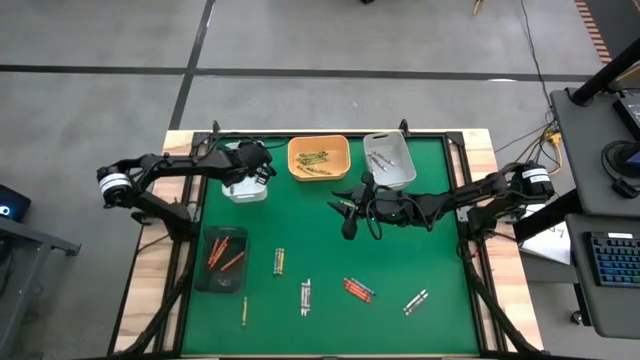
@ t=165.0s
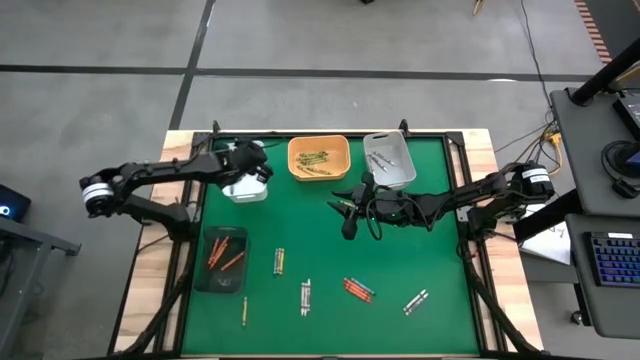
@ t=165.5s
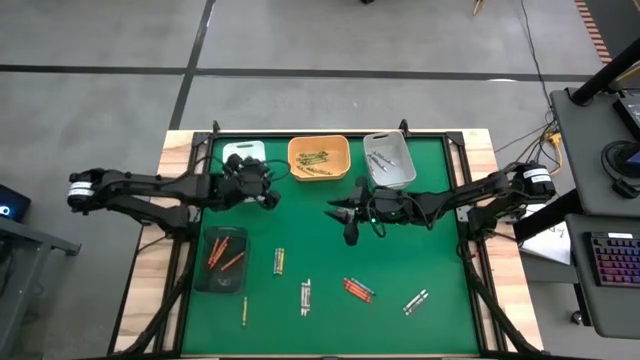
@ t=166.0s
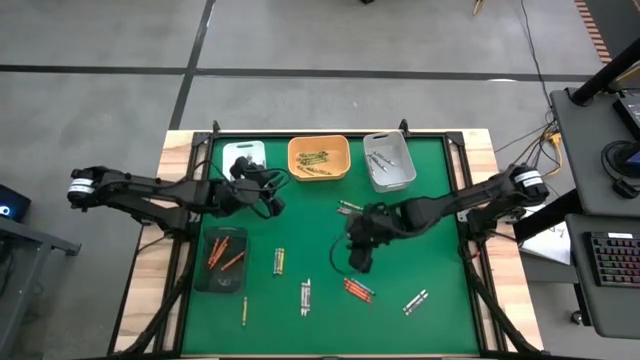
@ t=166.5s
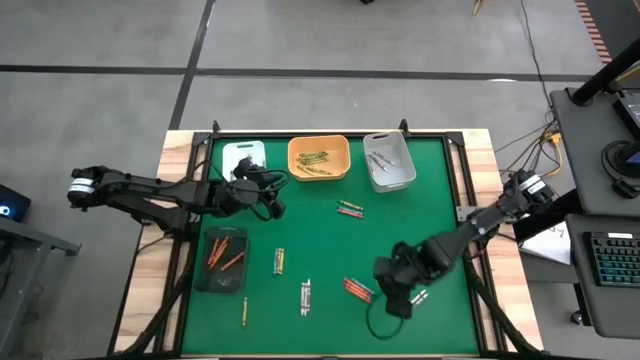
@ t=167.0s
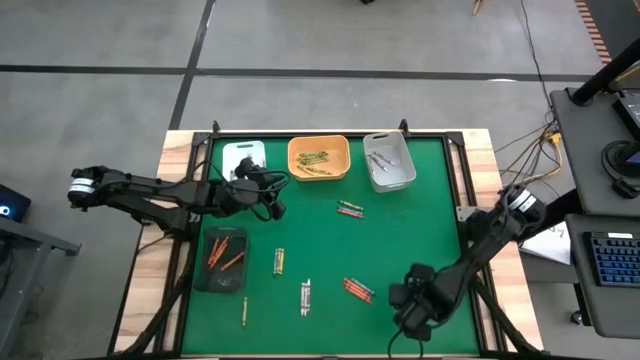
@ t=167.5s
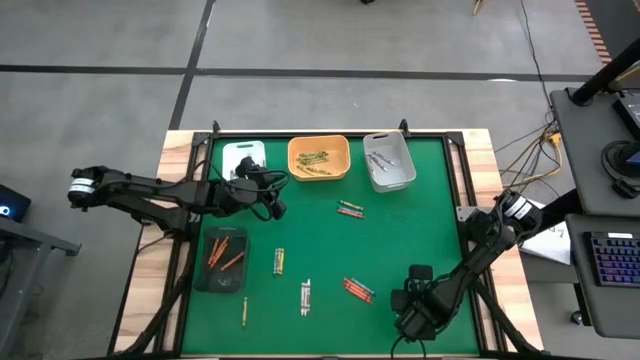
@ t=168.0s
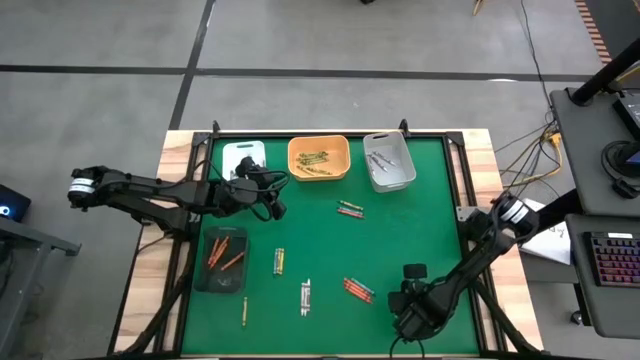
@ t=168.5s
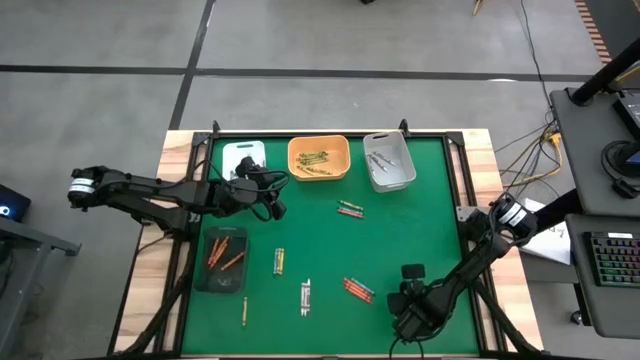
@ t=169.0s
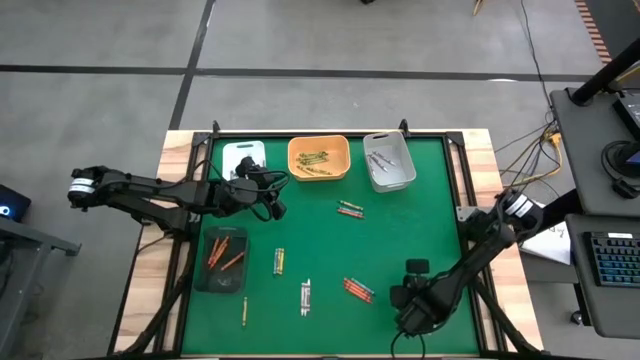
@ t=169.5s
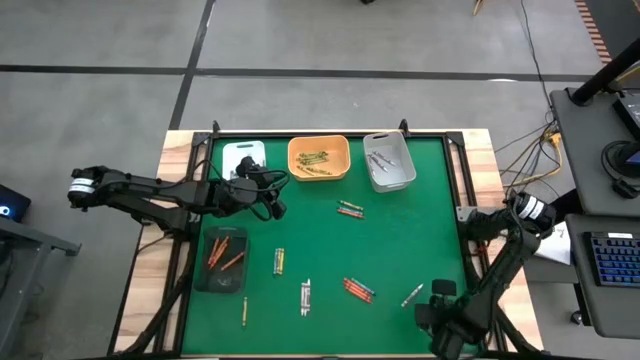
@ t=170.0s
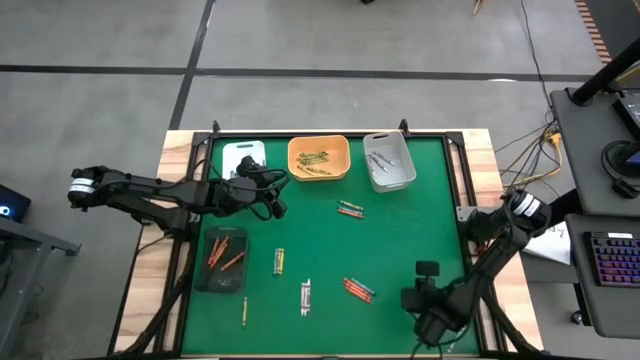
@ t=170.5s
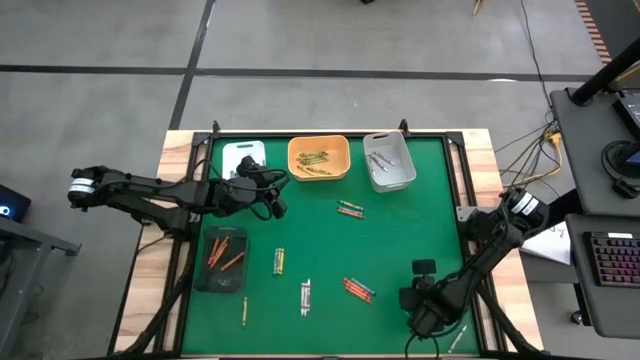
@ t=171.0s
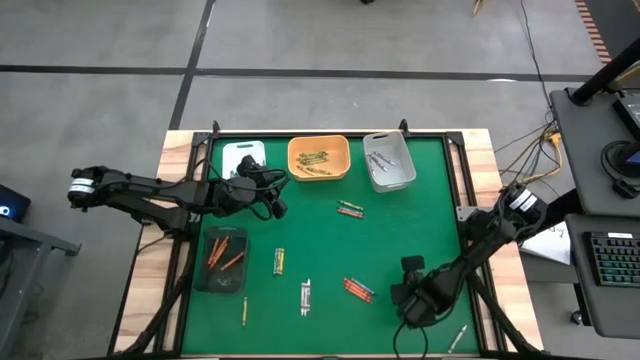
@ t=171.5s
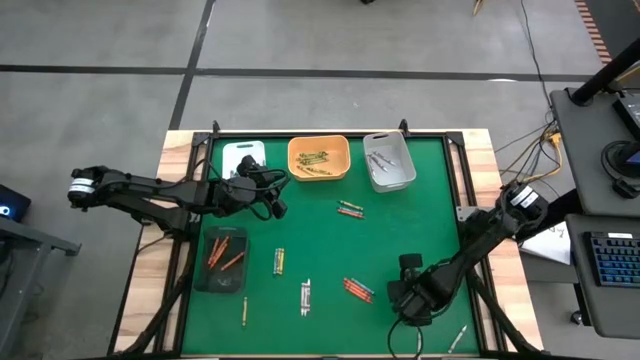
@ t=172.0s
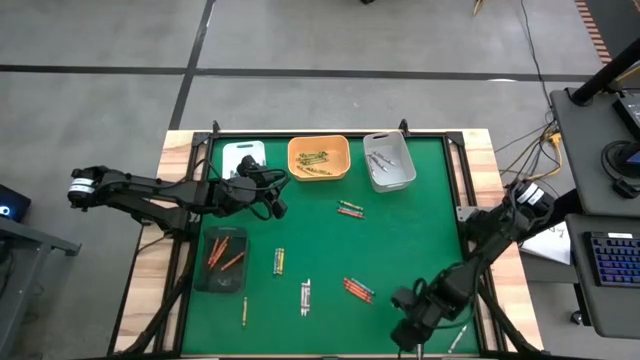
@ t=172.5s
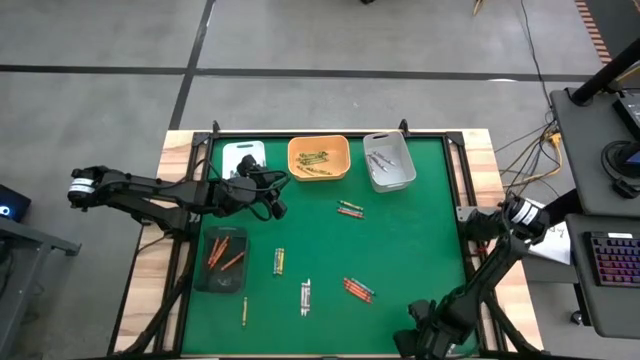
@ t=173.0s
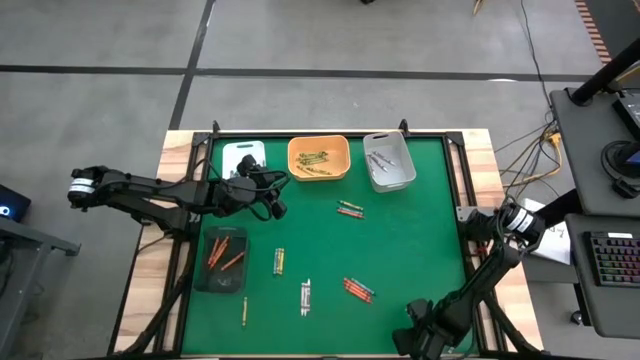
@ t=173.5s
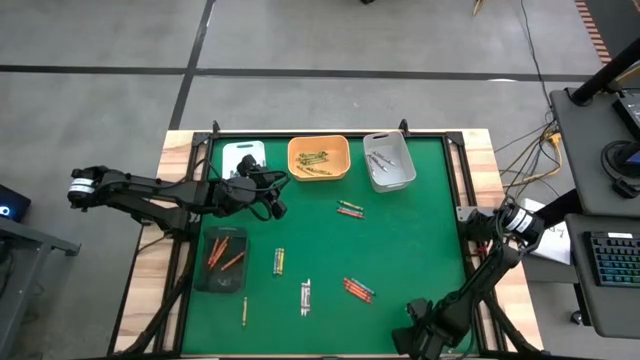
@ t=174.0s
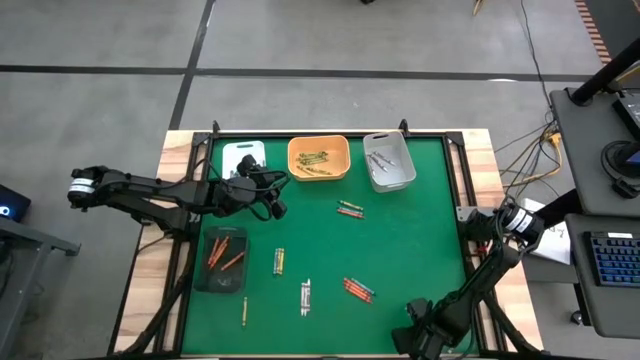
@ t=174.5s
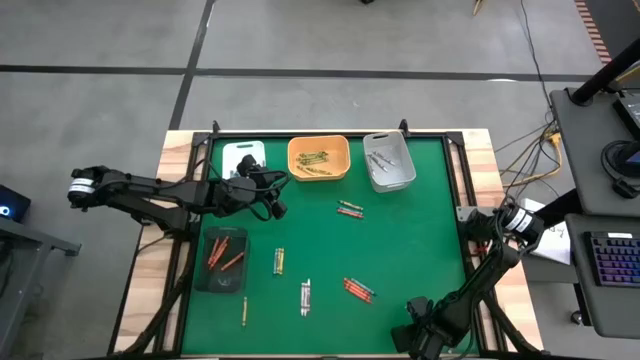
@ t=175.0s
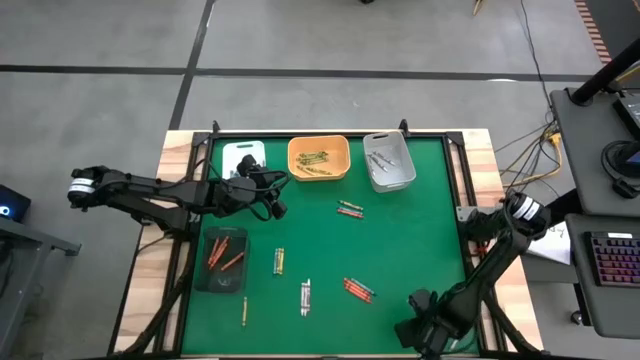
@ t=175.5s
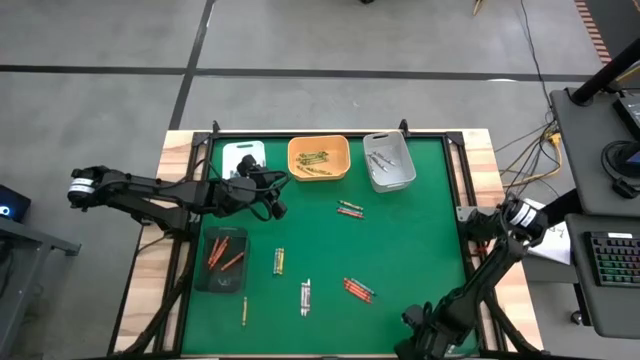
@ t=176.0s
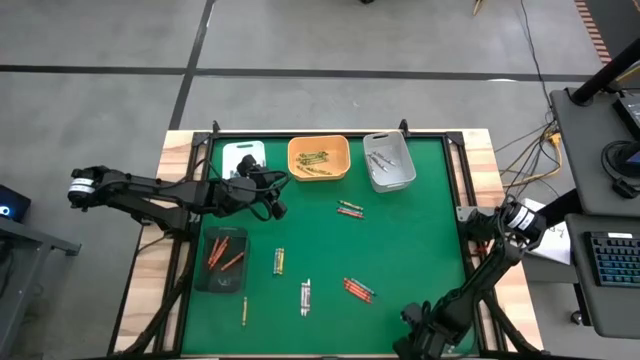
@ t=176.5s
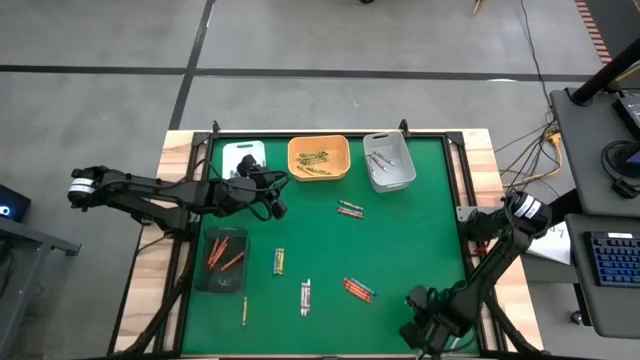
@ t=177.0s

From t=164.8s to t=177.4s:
Task: Sort crayons
Put the white crayon into the gray bin

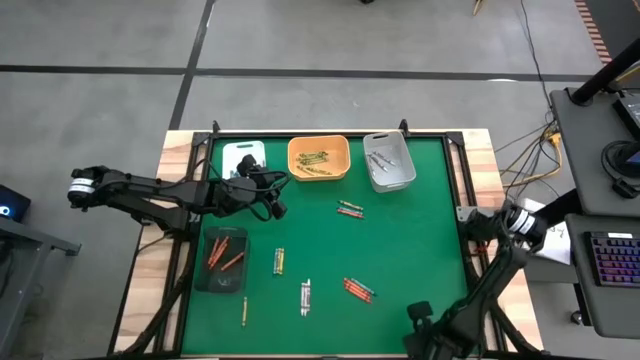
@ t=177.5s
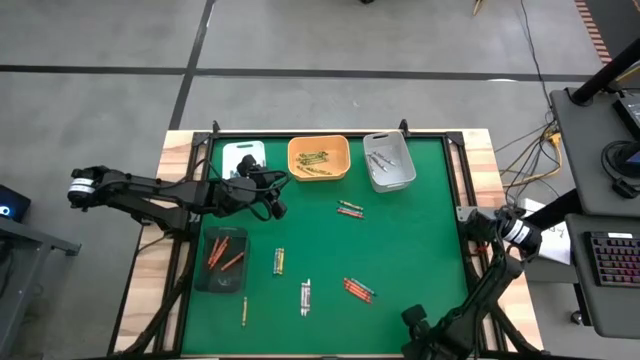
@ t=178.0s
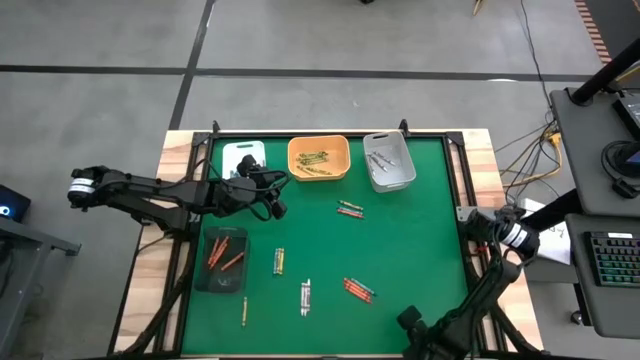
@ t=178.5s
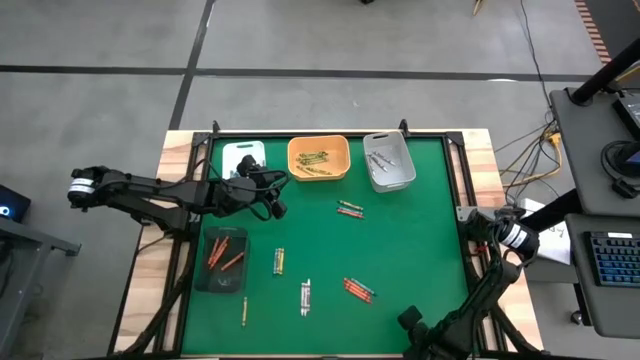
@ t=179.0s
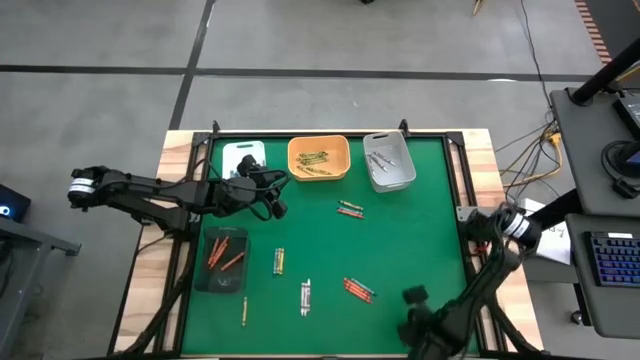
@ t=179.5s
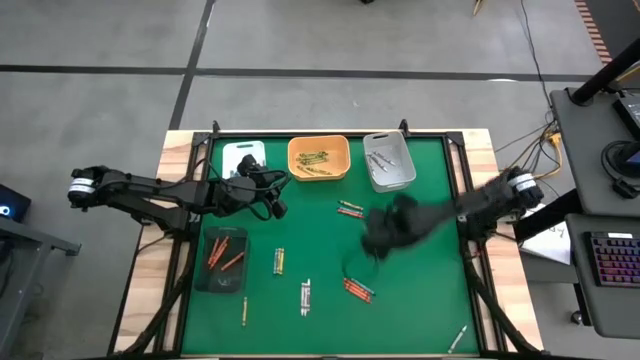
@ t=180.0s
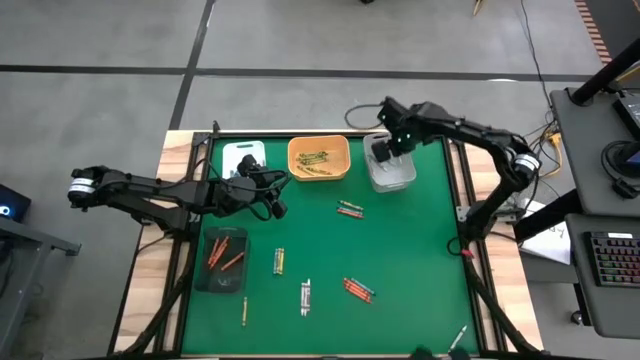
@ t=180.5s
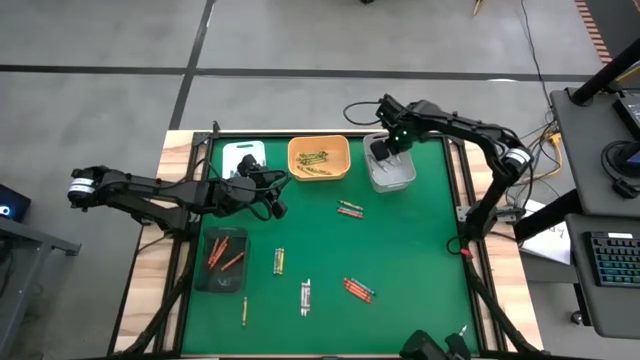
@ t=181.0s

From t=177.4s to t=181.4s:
Put the white crayon into the gray bin

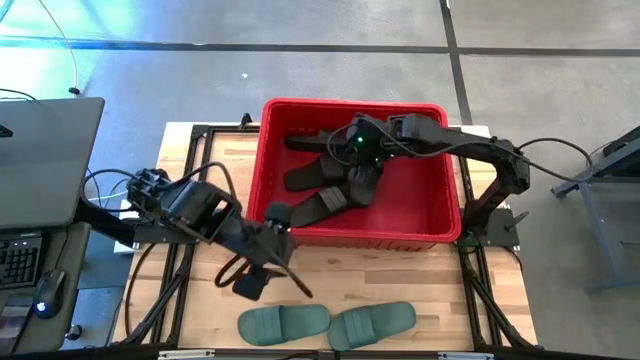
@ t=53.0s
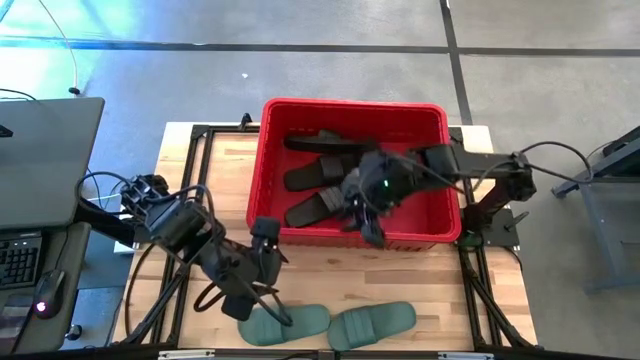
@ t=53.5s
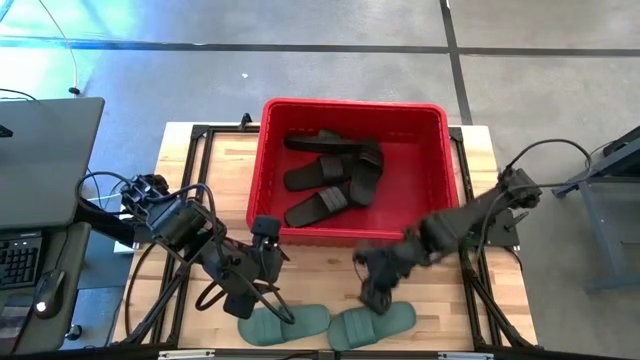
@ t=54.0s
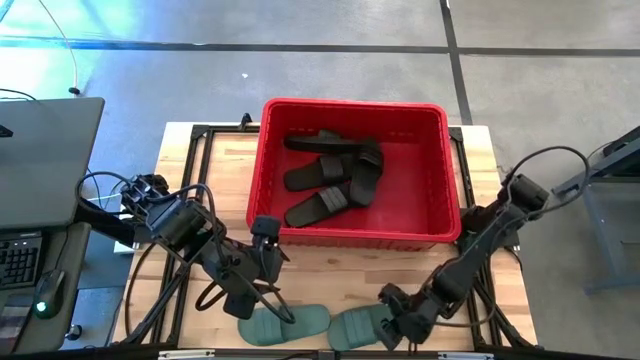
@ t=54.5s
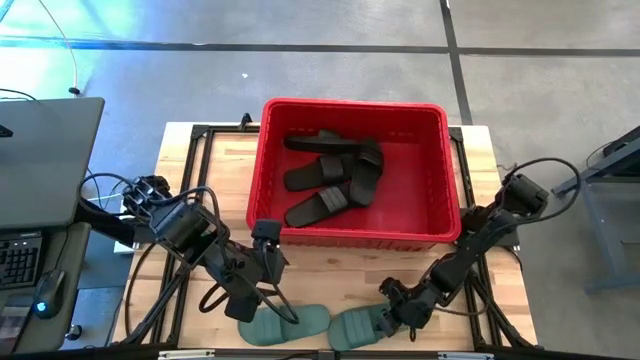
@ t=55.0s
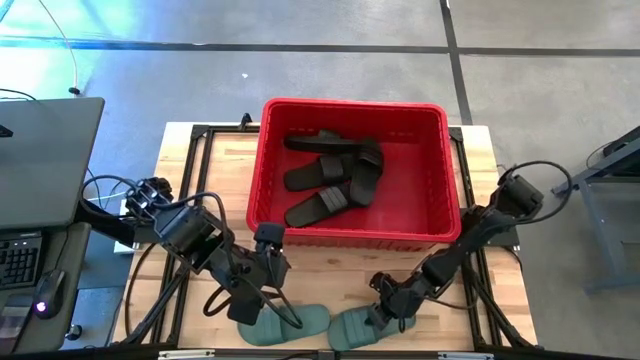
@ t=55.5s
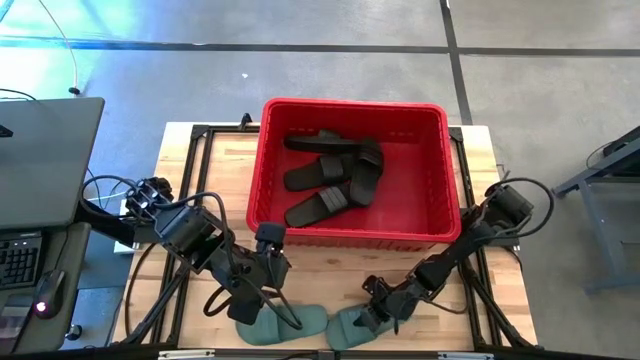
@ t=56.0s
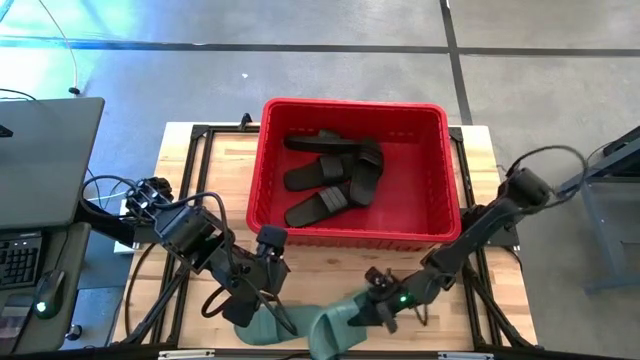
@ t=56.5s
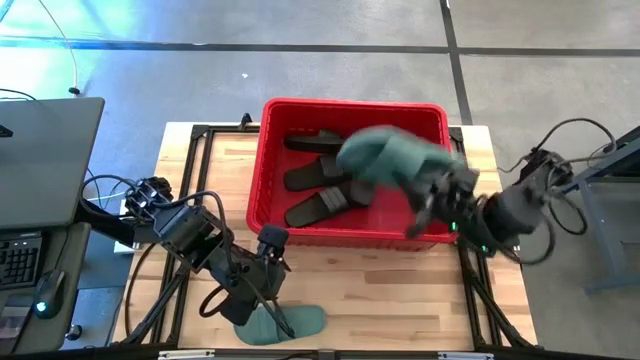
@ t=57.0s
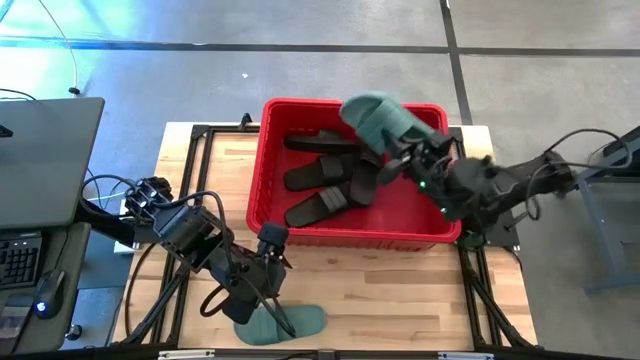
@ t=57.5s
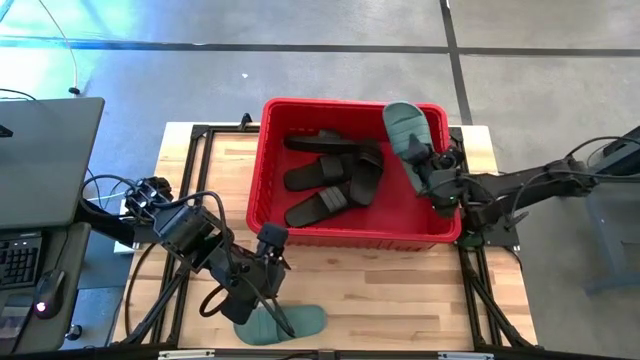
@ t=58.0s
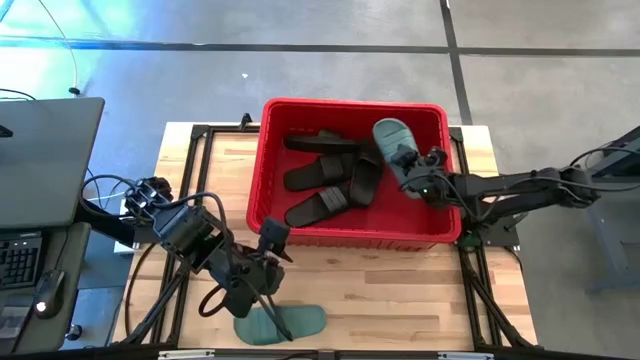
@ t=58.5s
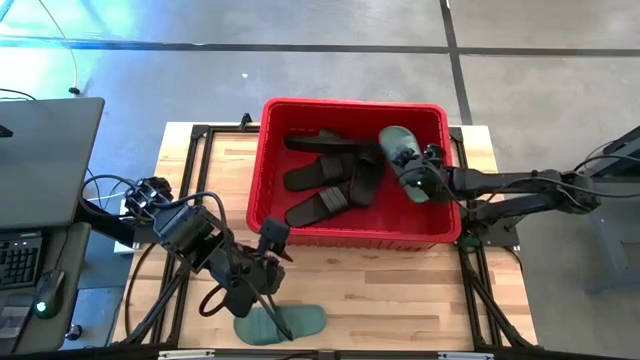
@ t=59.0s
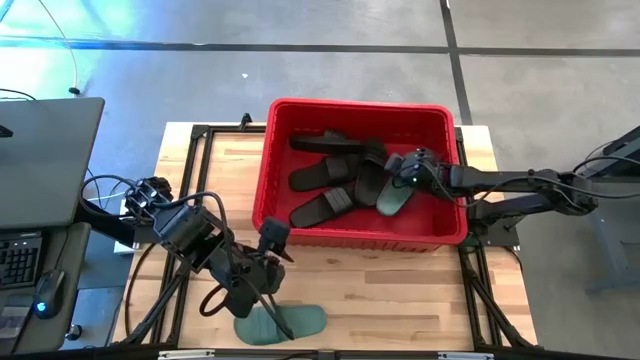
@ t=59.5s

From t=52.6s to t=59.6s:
Task: Pick and place slides into bin
Put the green slide into the red bin
